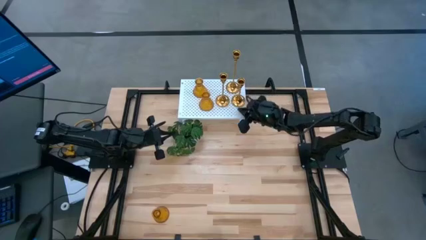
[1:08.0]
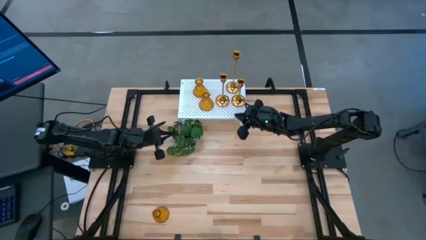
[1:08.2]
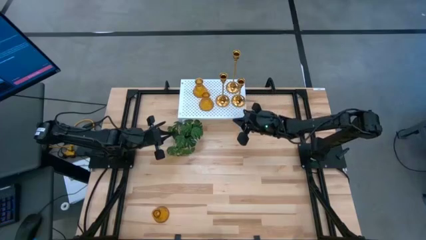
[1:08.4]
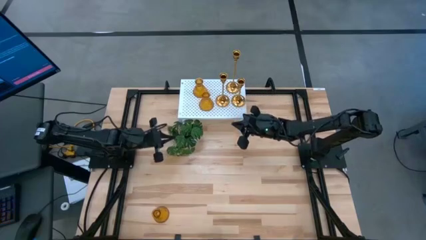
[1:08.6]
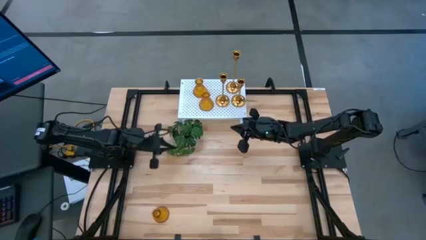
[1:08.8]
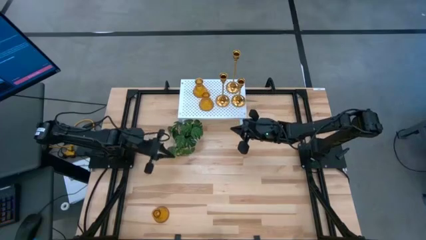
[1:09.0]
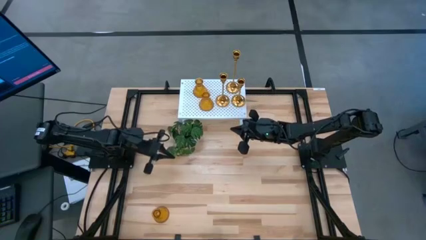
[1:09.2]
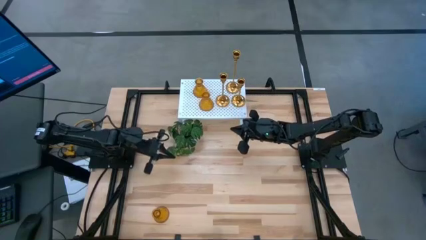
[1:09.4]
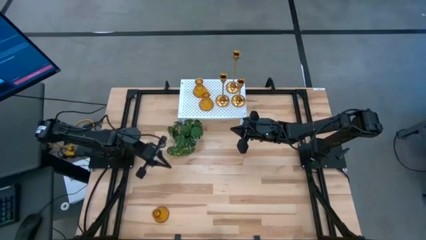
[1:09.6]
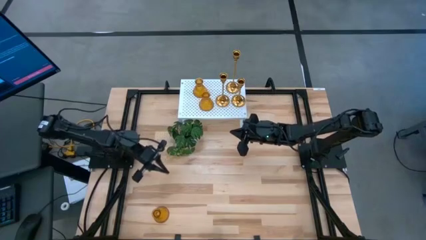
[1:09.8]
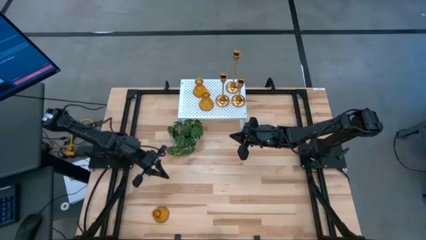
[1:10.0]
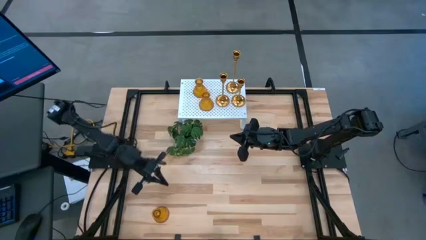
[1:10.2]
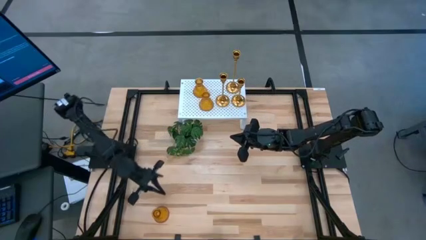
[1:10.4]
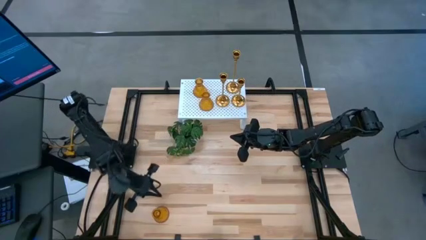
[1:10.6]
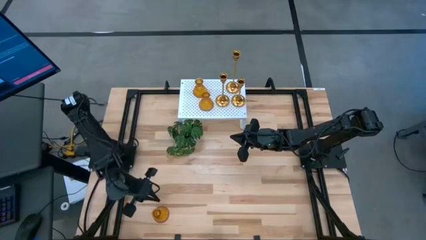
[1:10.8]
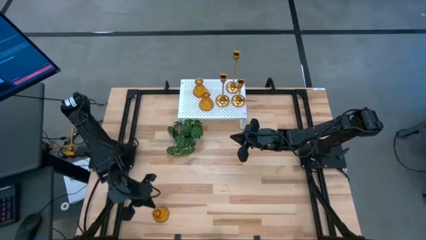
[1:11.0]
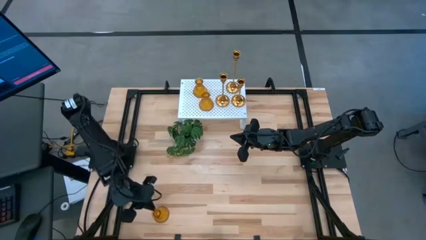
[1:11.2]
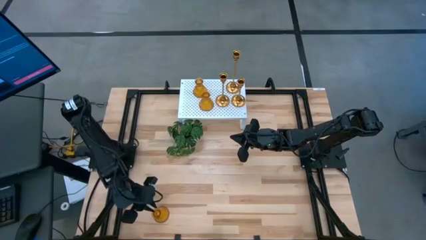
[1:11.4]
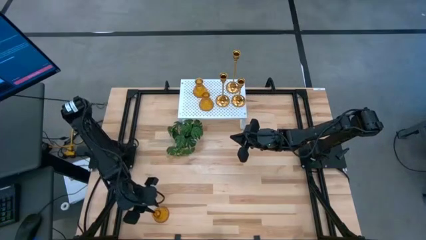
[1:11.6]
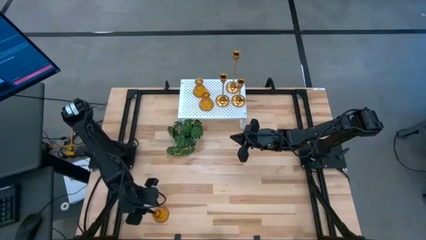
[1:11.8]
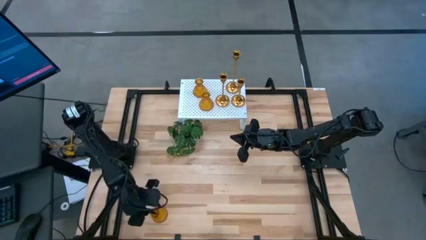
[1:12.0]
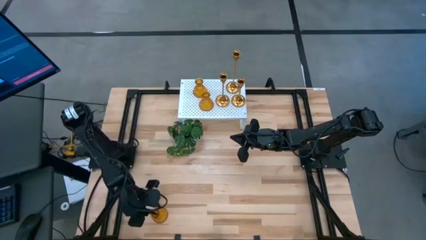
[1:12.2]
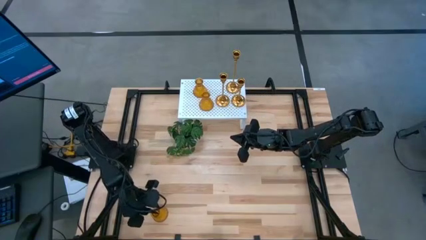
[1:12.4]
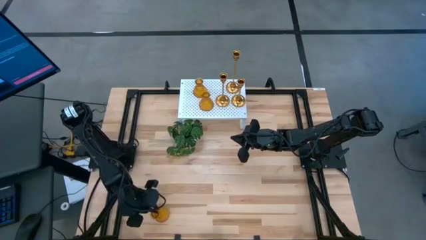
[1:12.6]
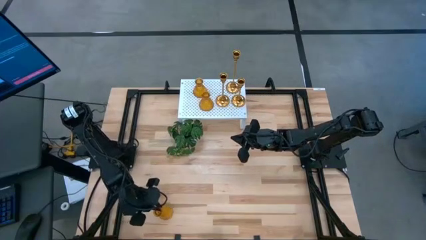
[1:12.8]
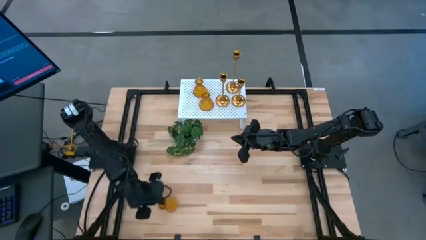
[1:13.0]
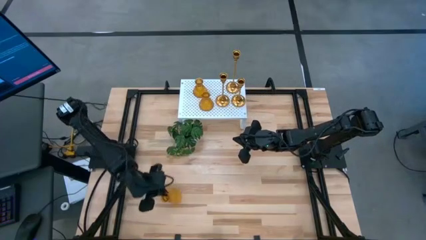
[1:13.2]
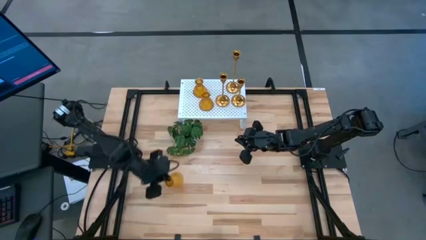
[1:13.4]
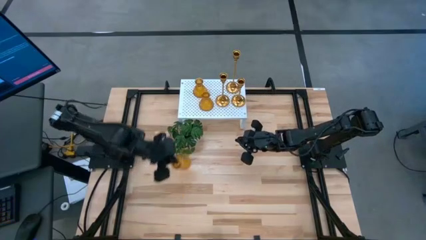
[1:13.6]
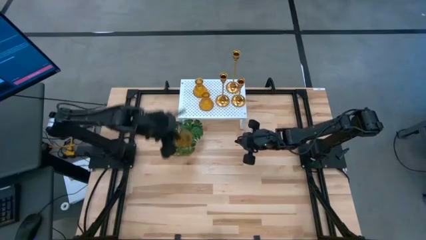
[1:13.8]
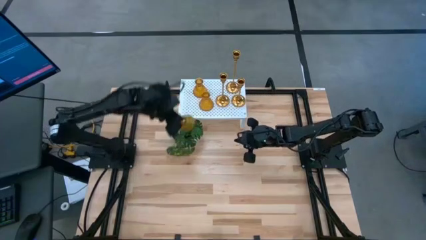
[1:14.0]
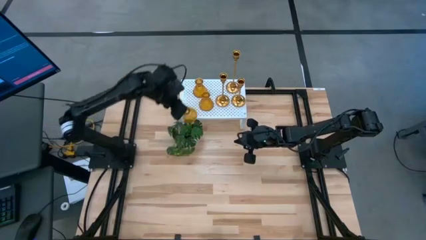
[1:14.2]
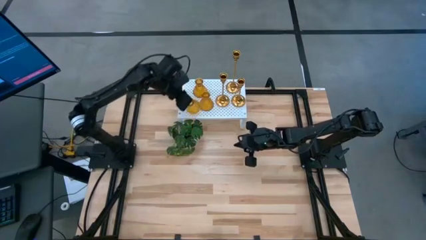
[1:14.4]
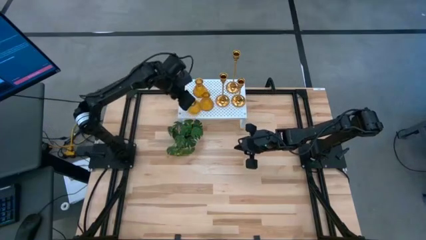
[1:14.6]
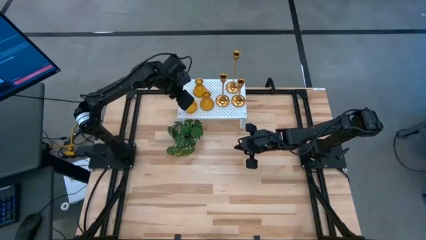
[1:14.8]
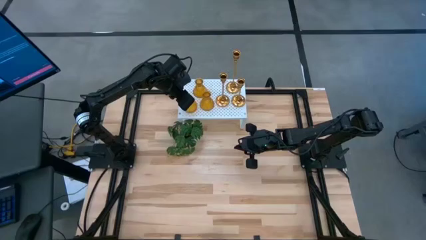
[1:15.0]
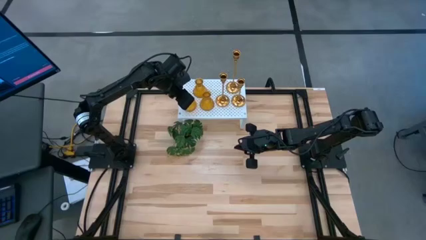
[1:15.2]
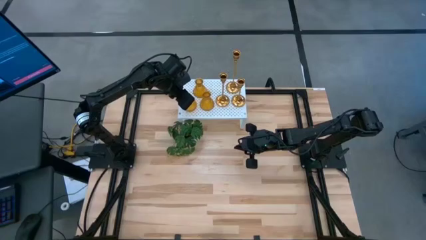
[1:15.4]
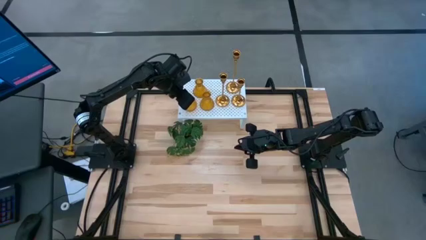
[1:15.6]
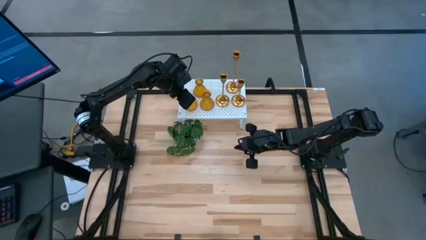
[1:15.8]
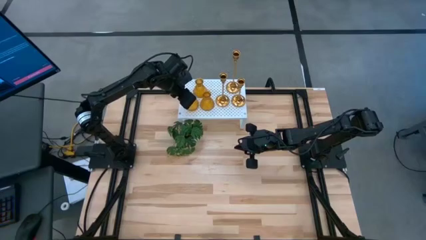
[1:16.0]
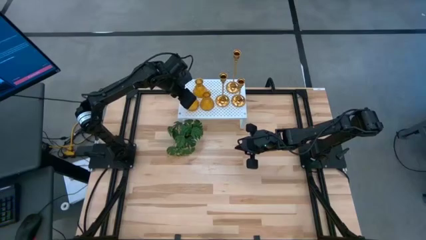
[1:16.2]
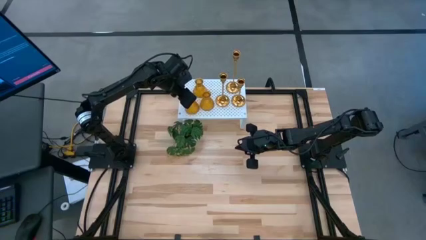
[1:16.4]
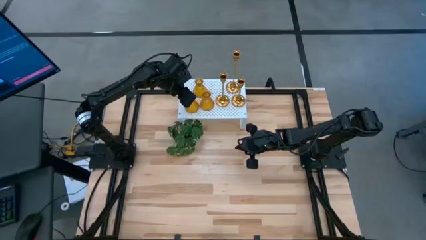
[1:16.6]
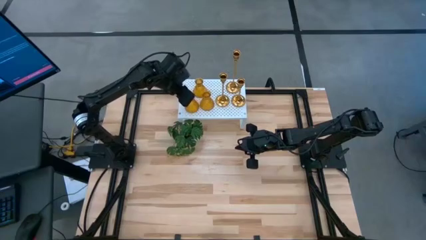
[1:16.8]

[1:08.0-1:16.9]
Task: Pick & Place candle stick holders
Put the yellow glass candle holder on the shelf

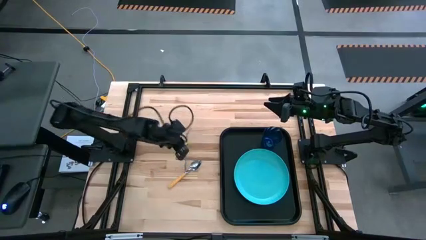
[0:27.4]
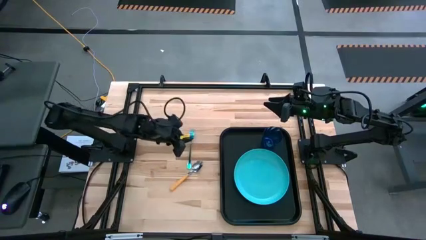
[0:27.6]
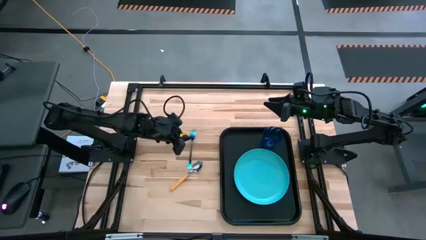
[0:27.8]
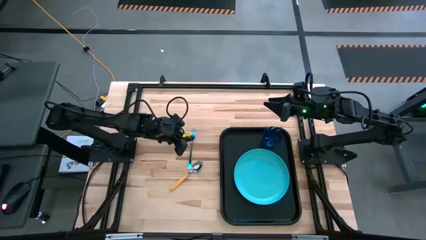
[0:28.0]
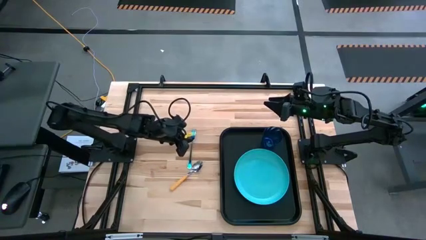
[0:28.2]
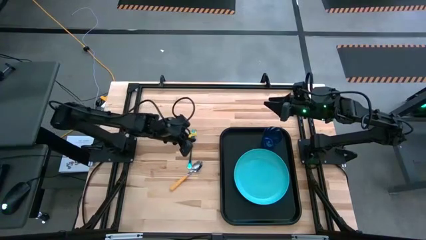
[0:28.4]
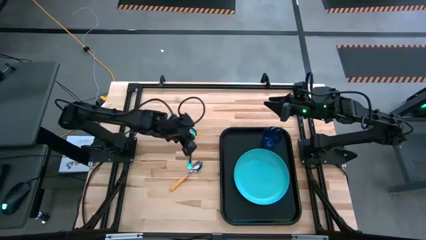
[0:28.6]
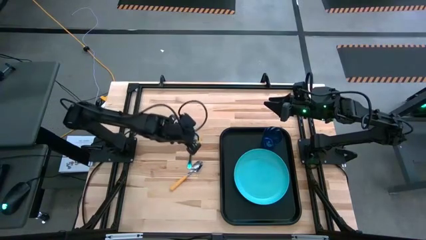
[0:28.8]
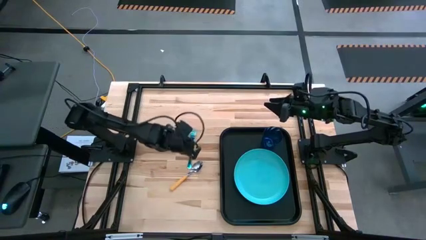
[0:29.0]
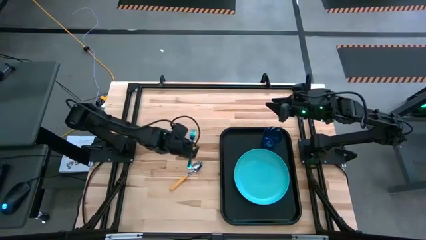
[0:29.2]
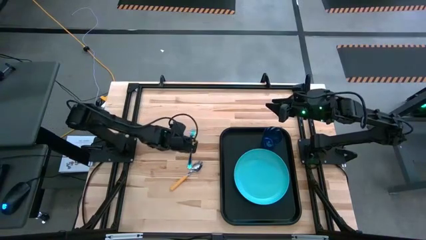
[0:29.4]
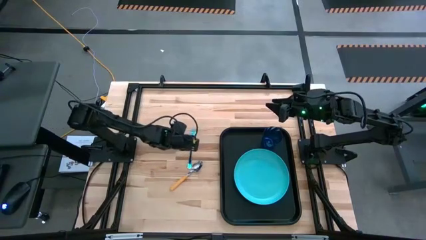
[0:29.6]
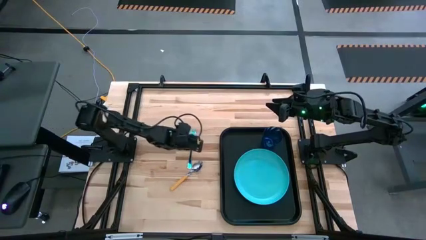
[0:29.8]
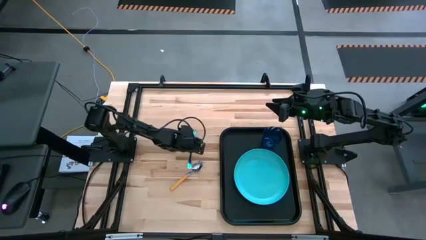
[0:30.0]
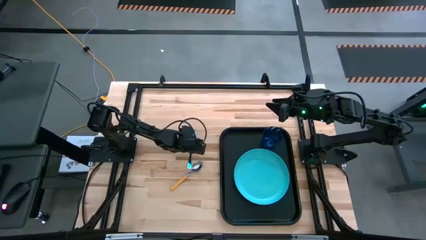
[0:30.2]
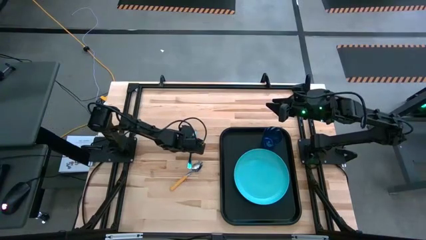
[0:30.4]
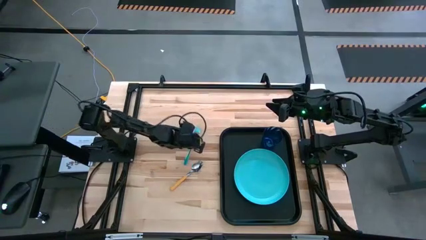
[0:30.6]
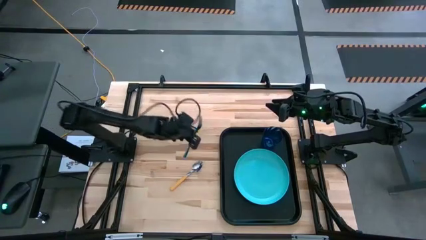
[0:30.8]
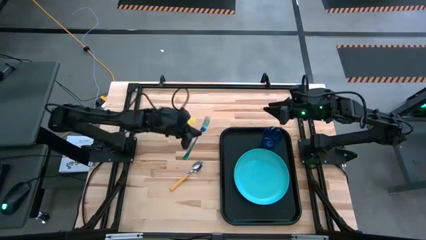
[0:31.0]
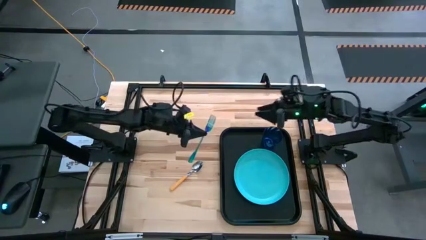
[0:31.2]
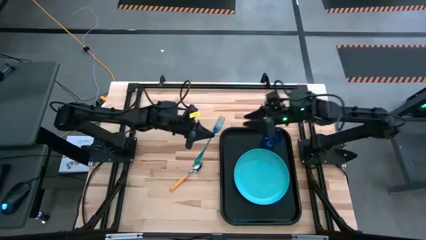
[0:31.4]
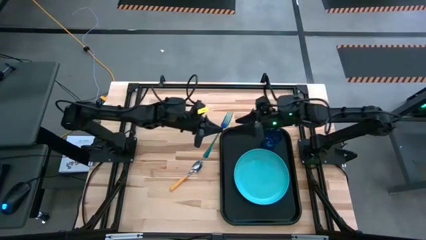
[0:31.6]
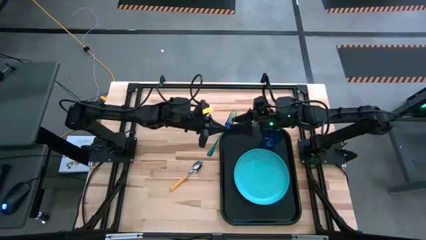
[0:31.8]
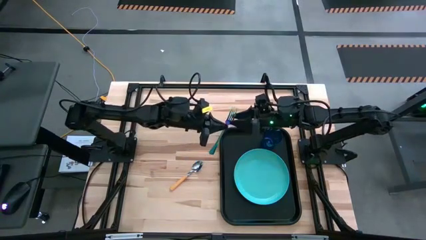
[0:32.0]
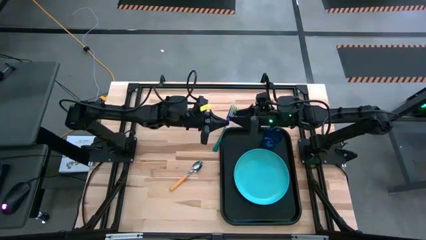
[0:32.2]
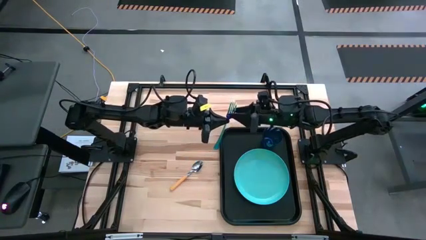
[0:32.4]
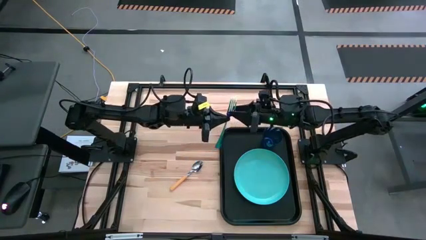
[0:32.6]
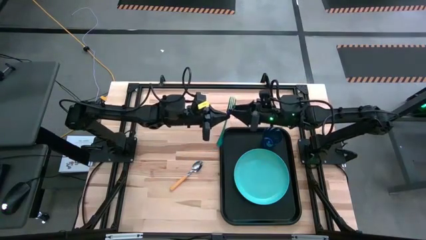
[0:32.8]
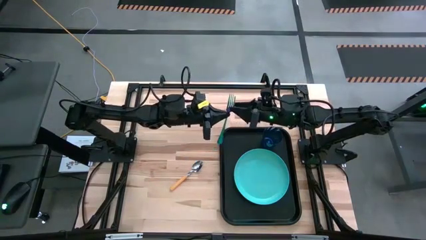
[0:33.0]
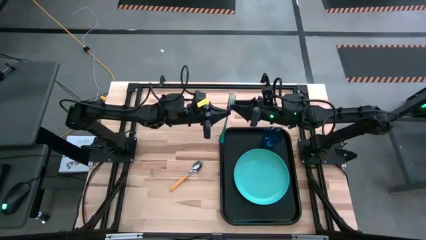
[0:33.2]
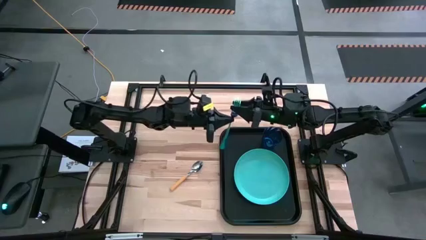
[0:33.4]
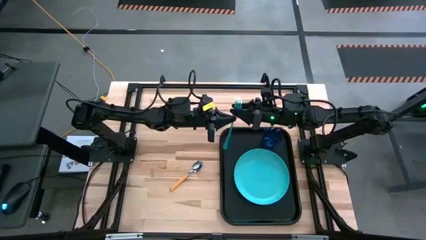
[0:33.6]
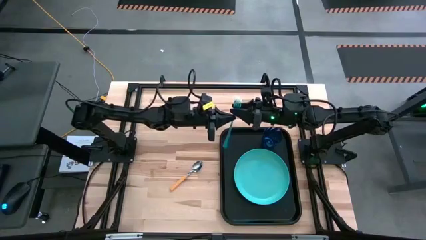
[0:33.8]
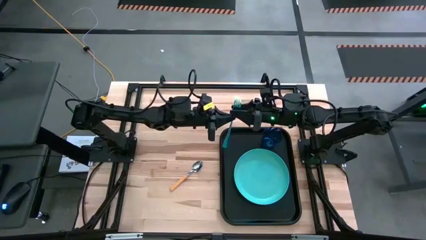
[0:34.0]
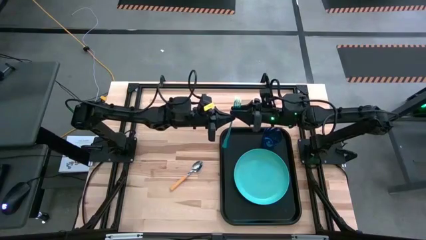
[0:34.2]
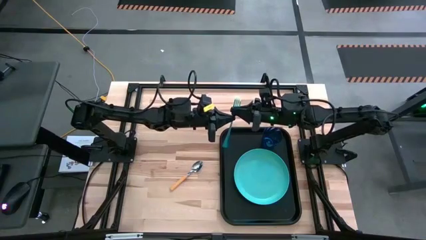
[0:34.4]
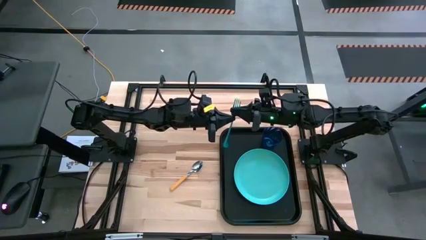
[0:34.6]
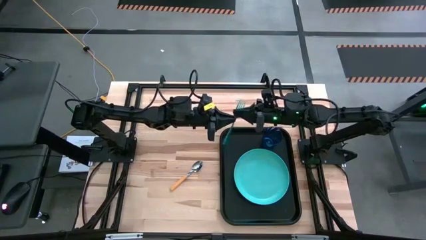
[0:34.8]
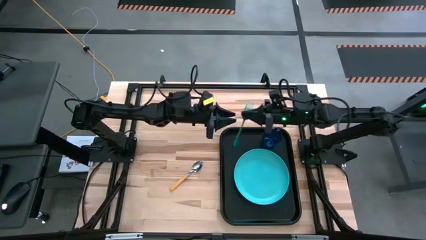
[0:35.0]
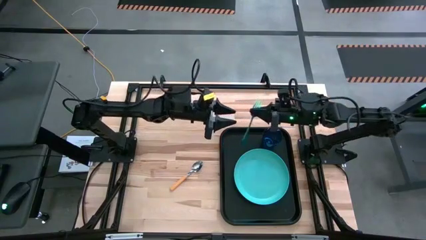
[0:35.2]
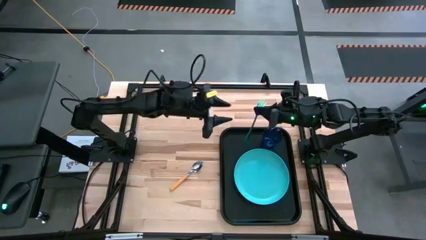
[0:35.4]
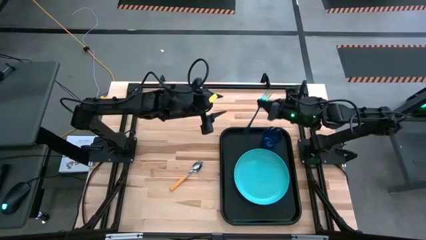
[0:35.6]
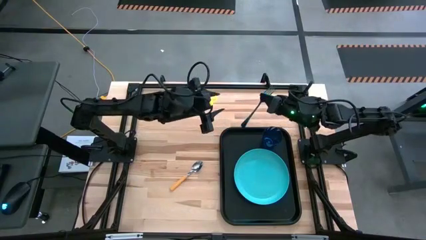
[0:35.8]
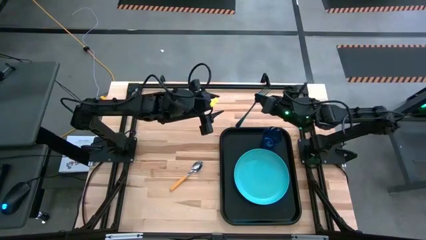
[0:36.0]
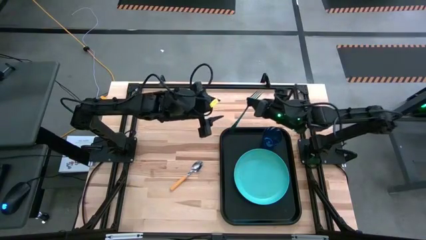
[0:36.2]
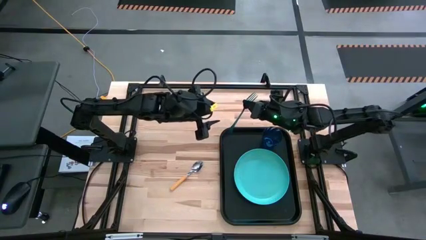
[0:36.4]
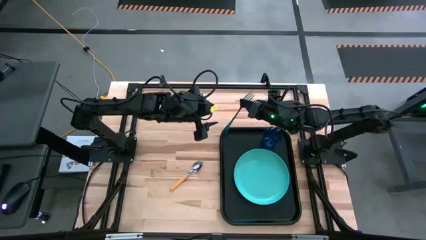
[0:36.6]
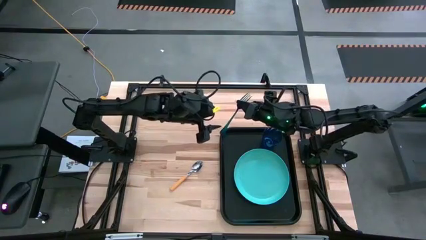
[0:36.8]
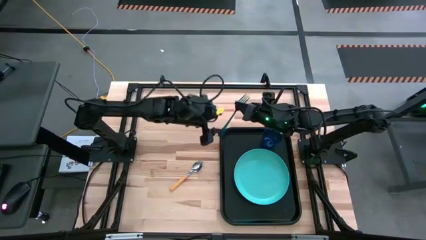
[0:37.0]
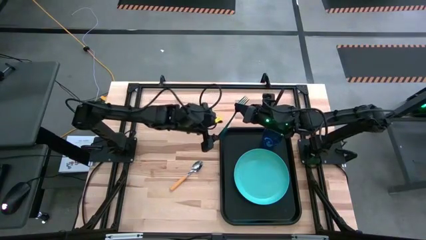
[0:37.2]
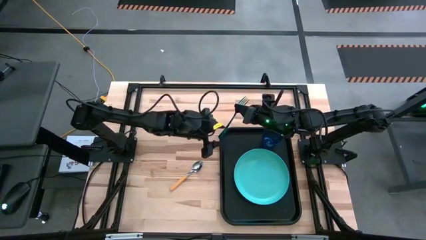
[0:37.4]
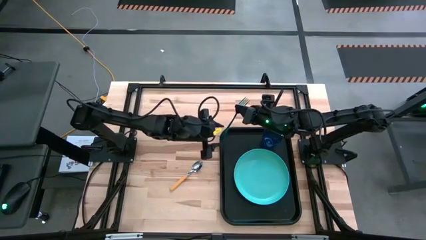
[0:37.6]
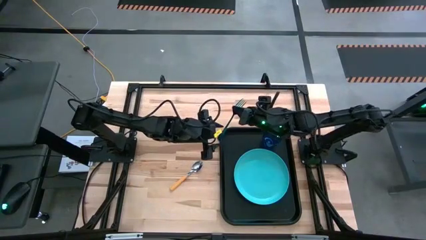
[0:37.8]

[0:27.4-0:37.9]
Task: Pick and place plate/cup/fork/spoon on tray
Put the blue fork on black serving tray to the right of the blue plate
